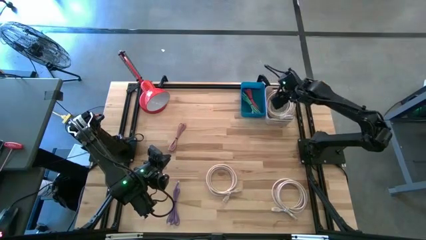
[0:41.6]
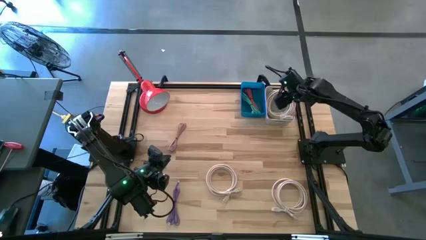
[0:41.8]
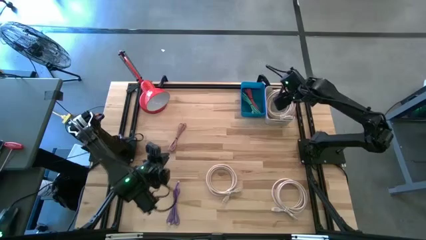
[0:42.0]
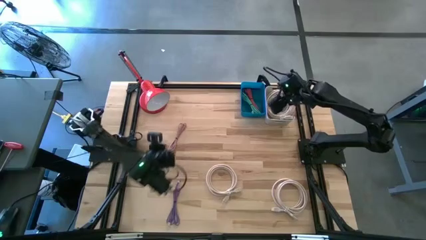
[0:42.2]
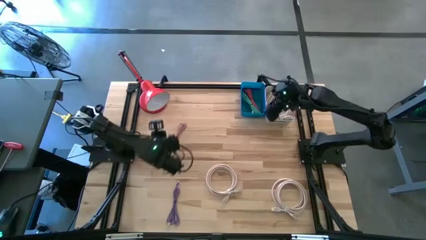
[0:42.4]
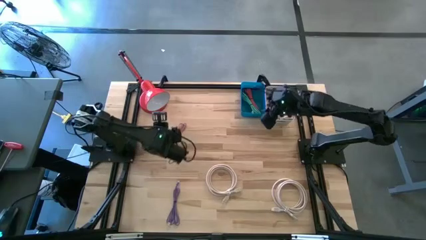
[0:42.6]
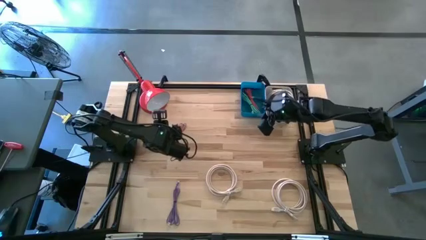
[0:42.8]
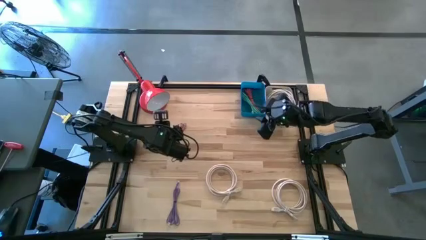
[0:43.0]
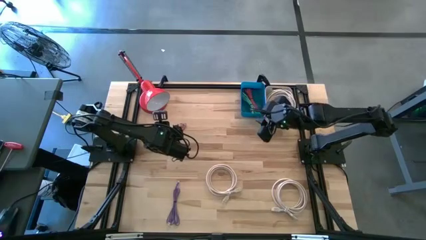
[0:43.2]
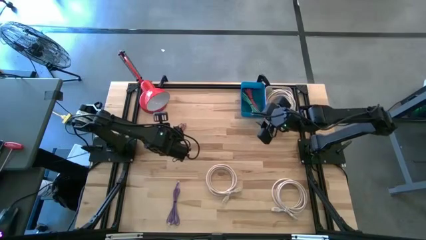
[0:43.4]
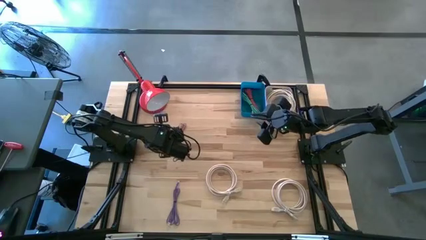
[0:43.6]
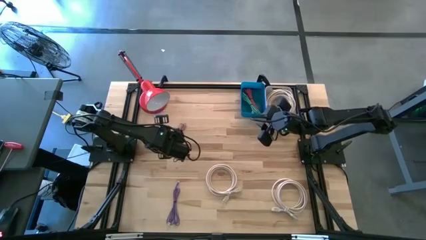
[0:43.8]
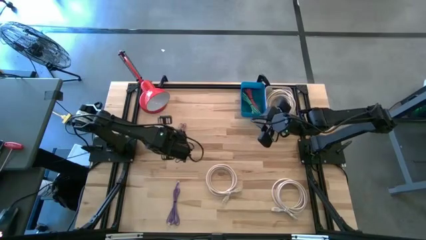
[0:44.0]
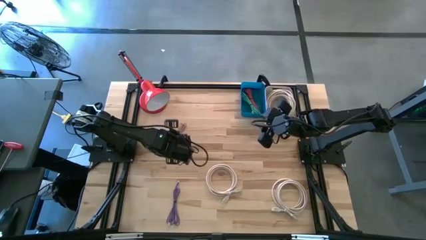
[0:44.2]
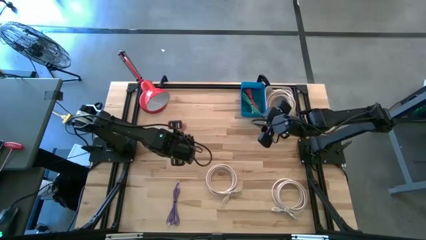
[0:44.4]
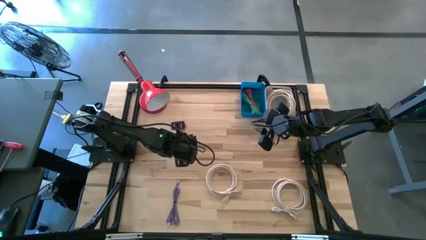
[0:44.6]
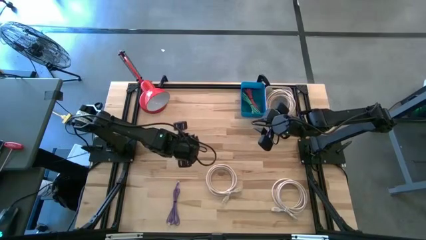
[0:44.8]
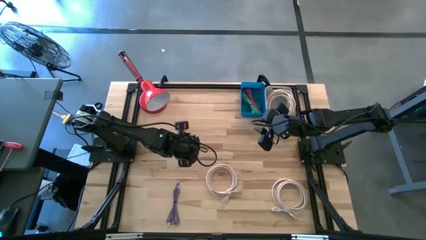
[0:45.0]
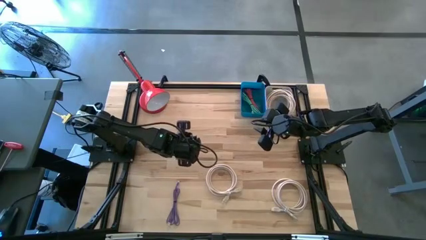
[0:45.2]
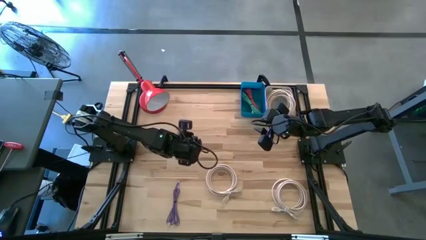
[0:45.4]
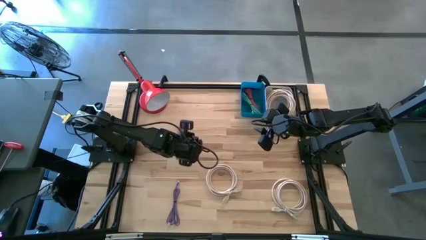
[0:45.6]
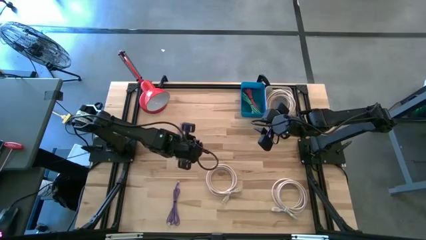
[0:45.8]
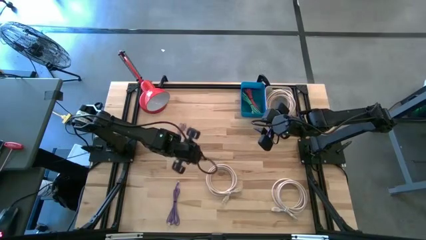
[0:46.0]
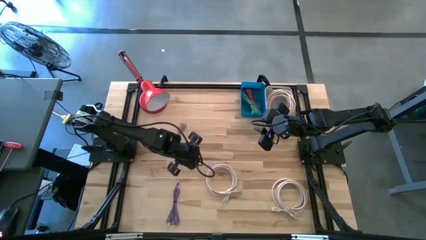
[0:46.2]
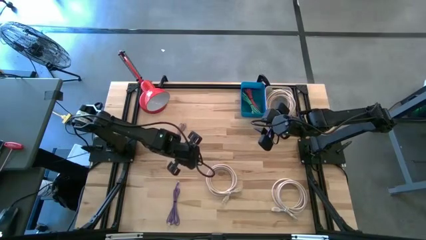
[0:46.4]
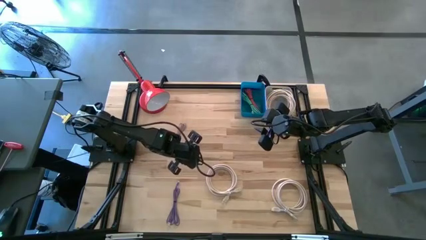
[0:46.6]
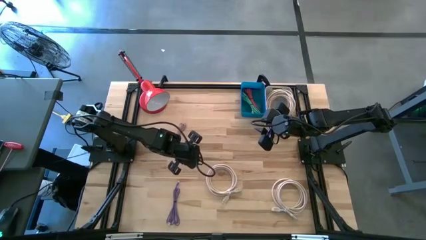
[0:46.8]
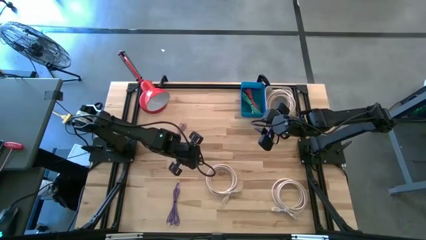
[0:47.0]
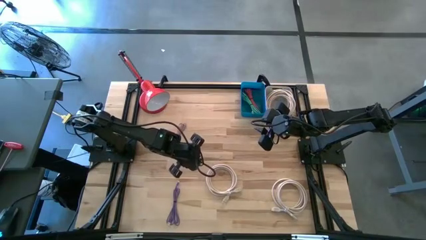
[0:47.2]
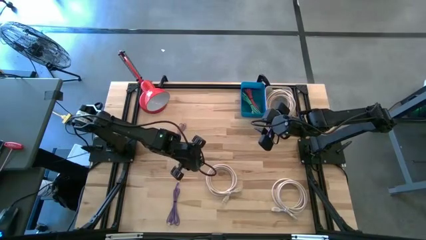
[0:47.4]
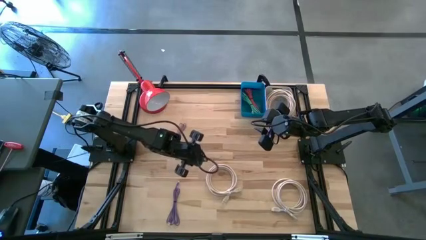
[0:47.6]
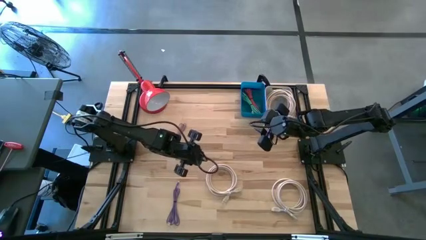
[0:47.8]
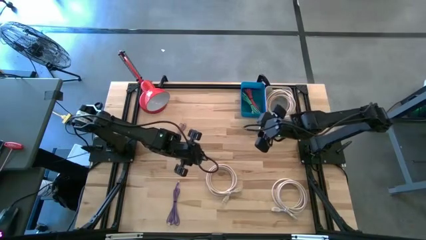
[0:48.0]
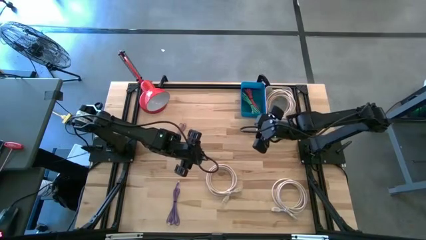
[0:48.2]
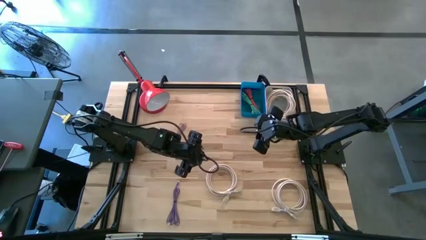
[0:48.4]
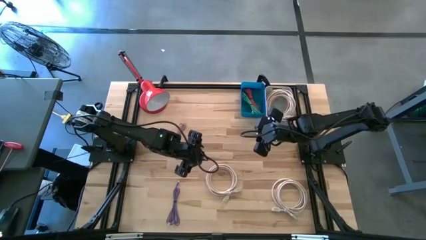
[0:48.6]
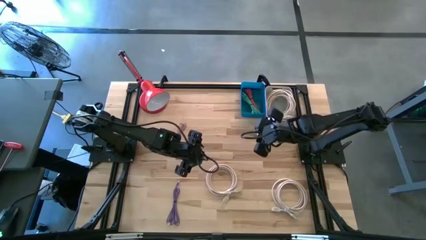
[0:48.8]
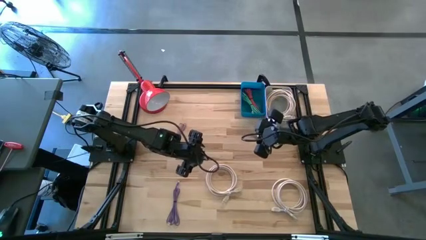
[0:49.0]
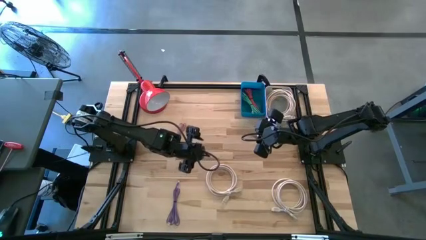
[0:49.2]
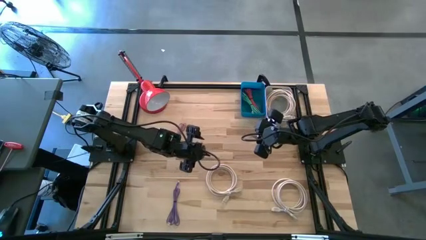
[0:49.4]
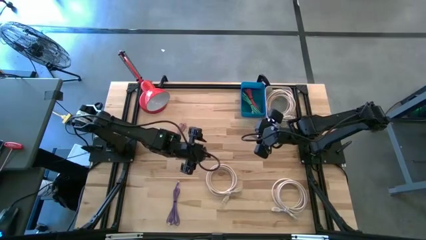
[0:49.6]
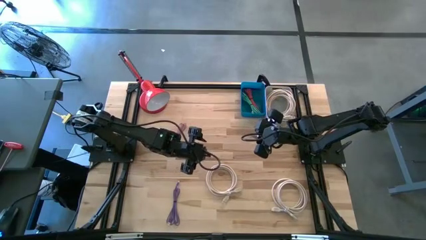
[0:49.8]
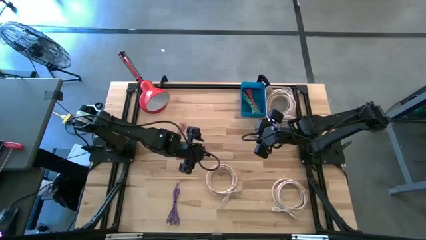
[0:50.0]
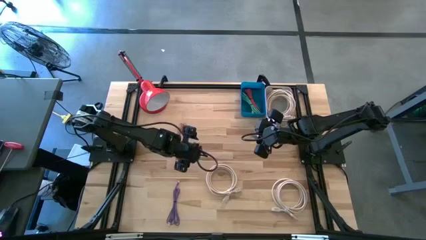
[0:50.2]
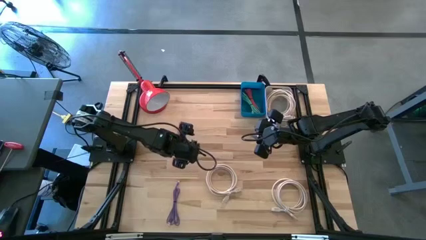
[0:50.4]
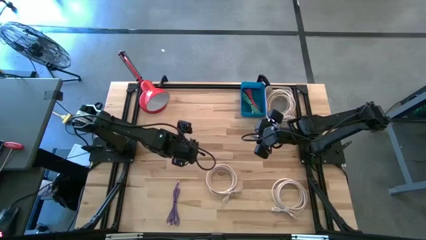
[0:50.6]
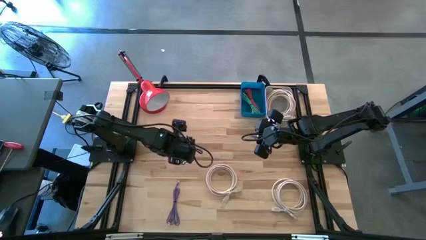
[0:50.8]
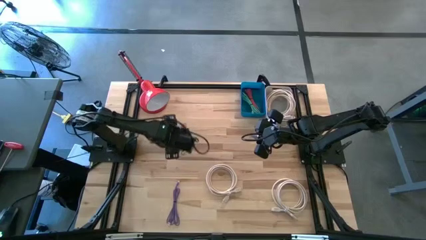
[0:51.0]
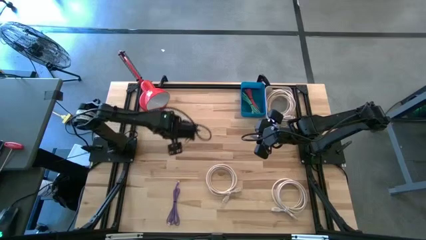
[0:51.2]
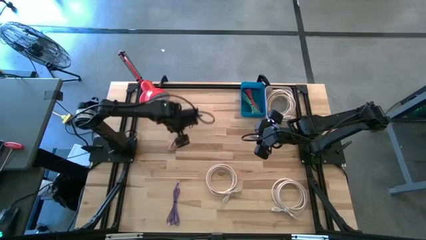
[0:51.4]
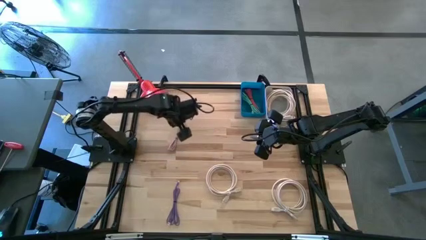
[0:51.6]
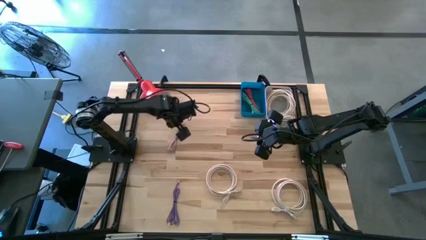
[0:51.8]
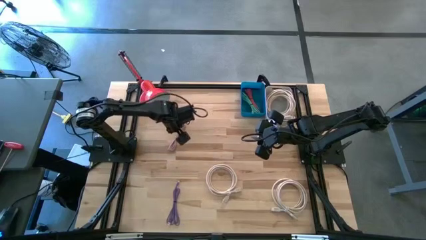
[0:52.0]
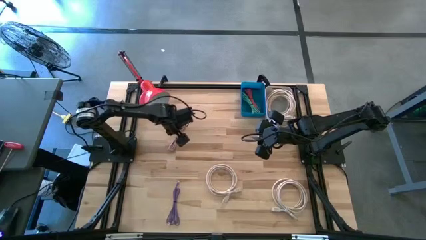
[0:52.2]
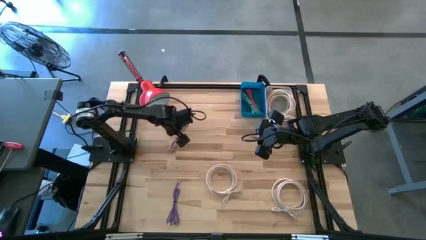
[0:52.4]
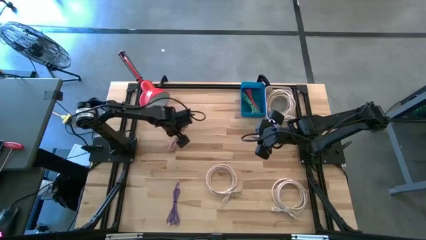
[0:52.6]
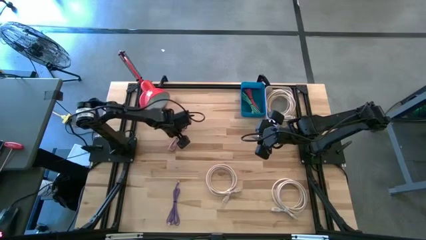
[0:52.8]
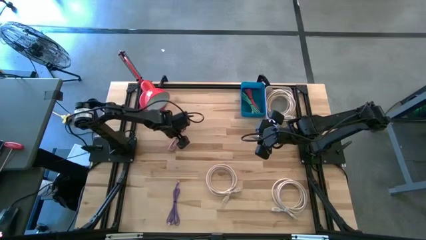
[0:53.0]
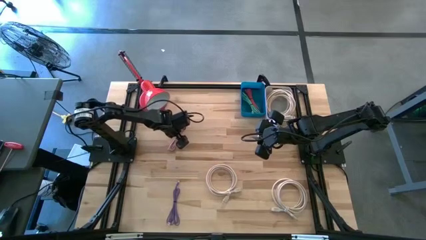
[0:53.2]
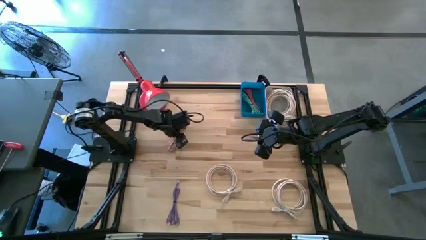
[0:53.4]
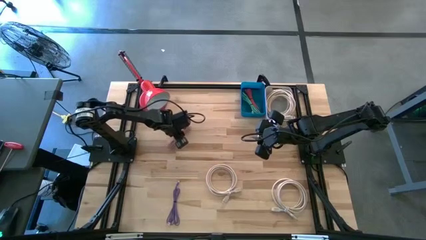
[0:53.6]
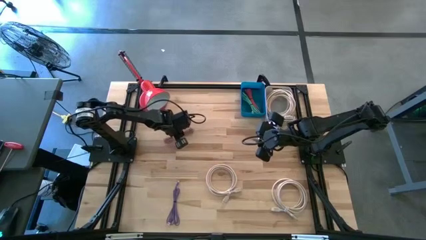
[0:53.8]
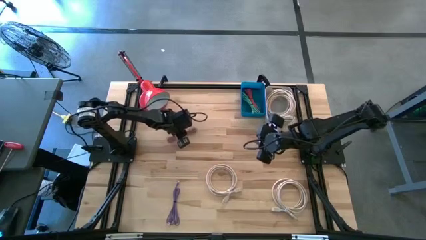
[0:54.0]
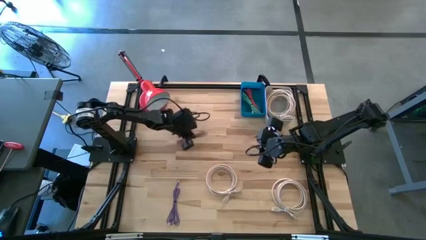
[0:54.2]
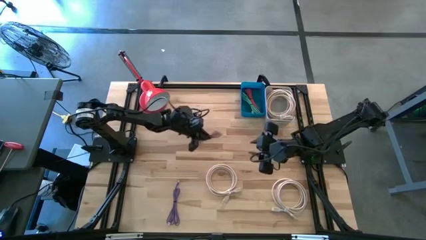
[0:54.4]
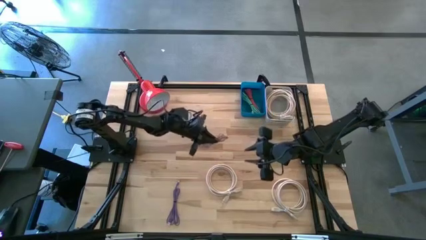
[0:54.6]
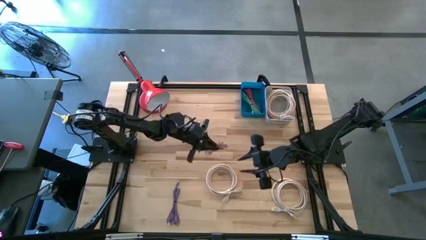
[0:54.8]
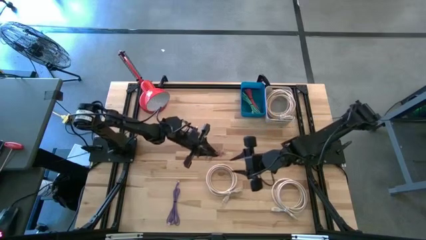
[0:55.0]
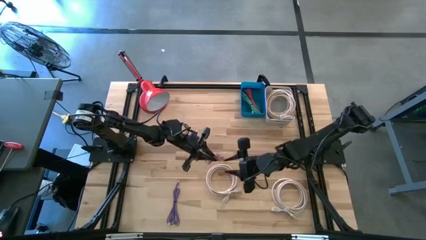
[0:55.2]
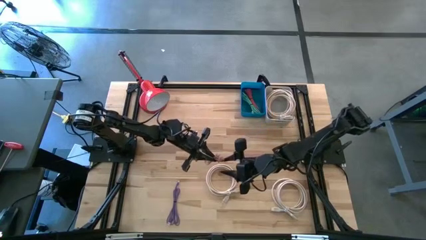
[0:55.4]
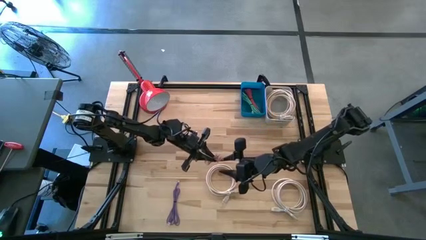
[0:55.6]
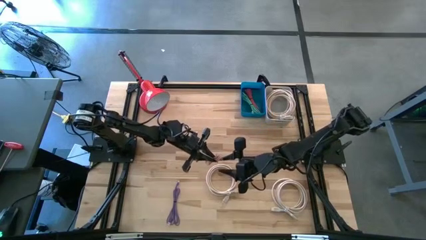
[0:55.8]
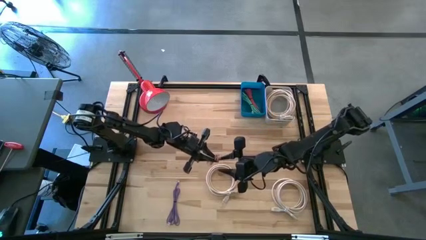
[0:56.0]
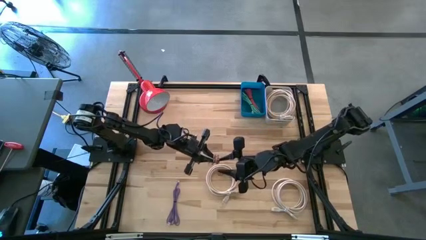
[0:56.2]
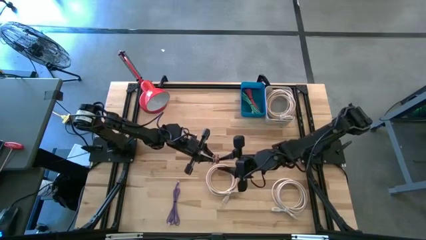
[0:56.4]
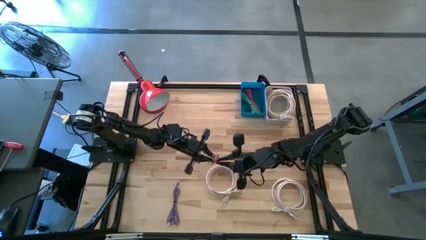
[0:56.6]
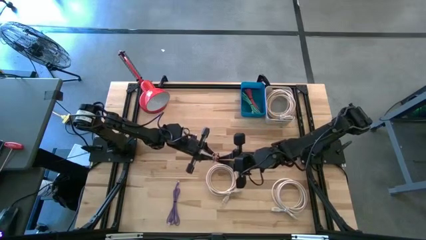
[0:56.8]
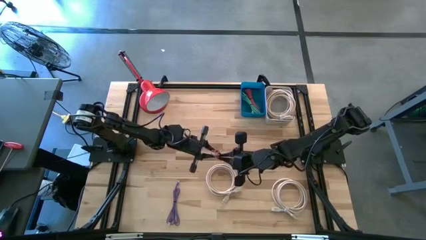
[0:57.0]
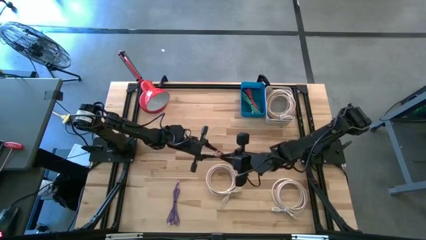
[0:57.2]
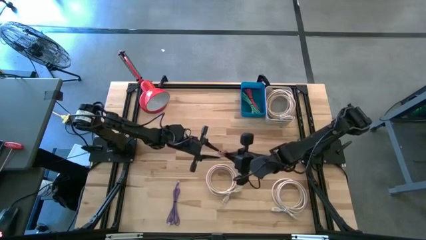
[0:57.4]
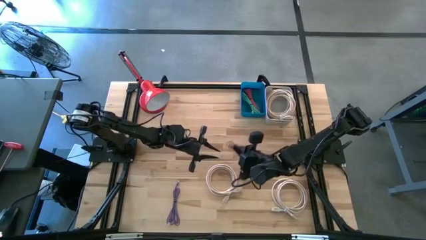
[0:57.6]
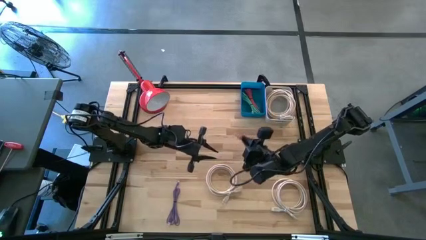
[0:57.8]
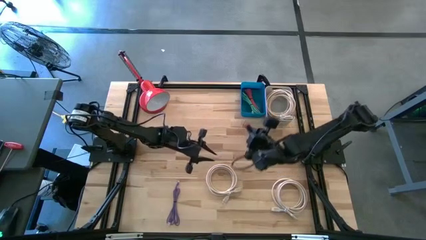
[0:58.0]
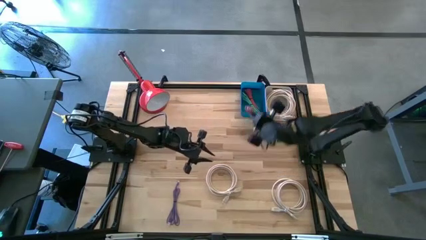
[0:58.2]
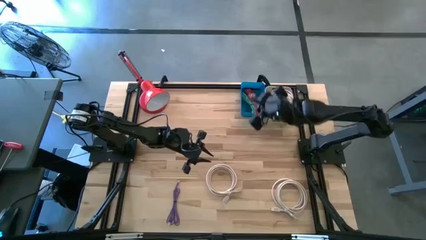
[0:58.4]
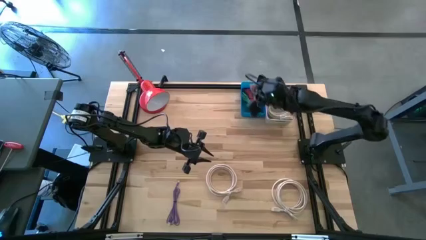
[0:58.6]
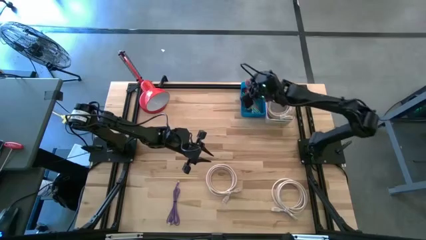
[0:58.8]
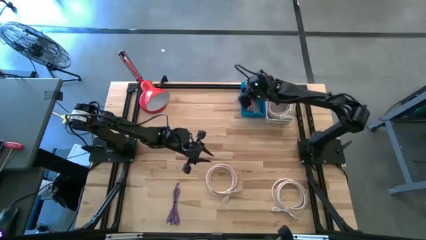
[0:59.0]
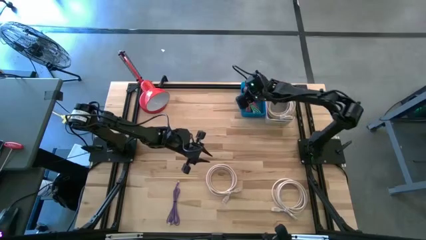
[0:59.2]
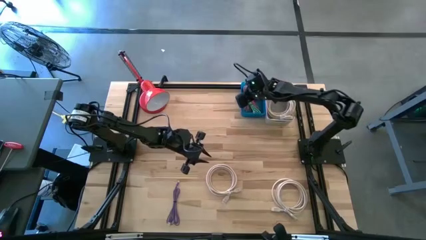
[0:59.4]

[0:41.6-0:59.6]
Task: Pick & Place USB Port
Put the pink charger cable into the blue bin
